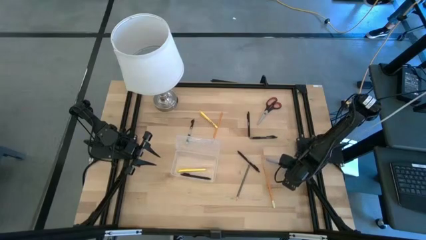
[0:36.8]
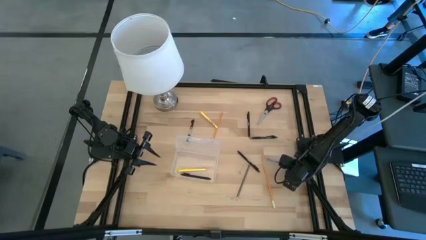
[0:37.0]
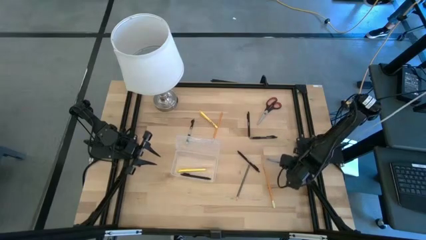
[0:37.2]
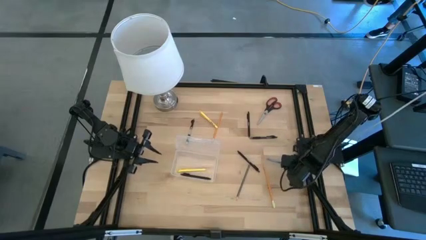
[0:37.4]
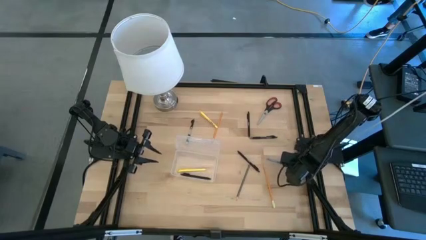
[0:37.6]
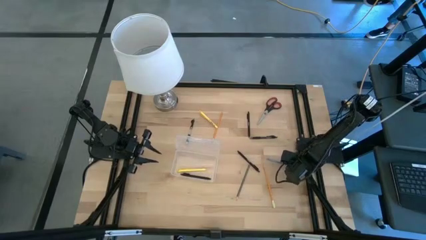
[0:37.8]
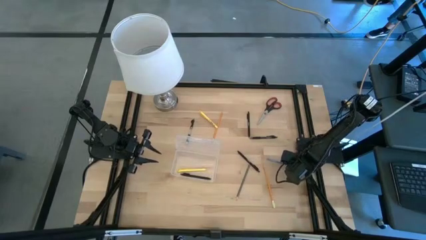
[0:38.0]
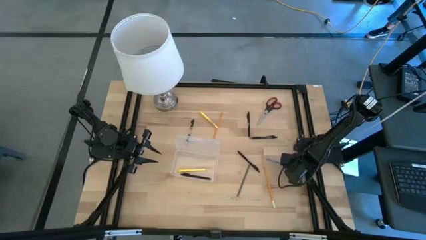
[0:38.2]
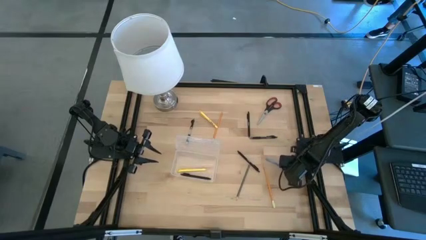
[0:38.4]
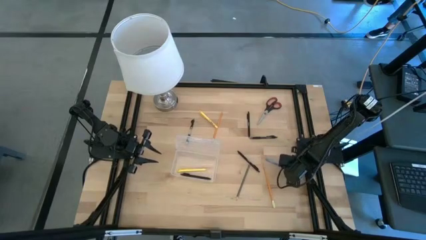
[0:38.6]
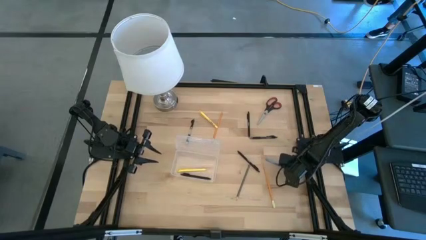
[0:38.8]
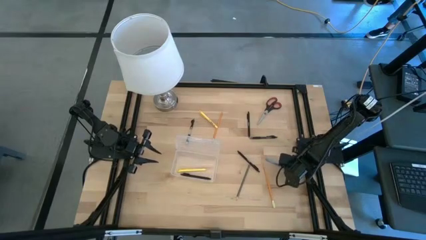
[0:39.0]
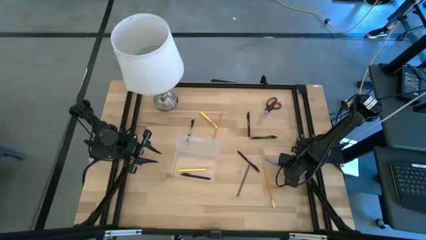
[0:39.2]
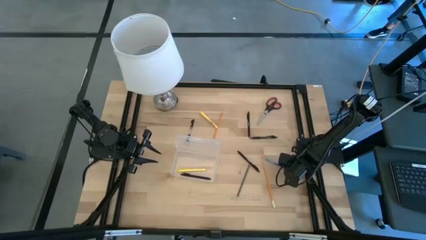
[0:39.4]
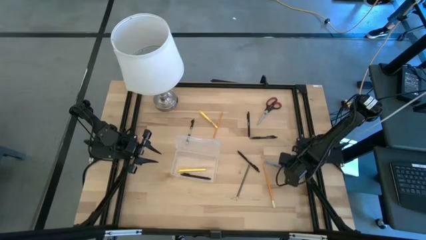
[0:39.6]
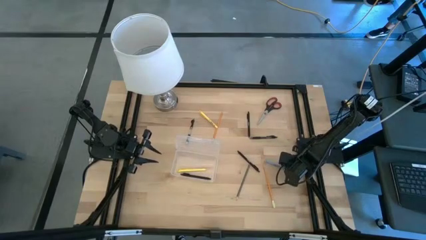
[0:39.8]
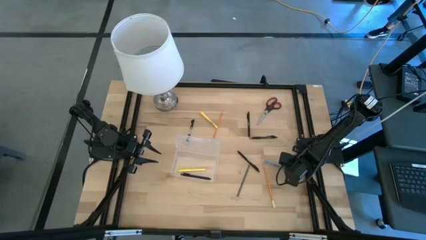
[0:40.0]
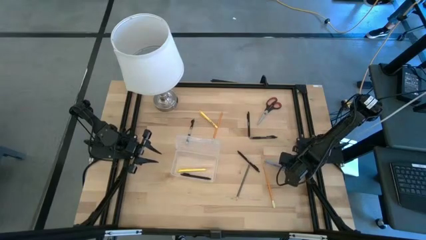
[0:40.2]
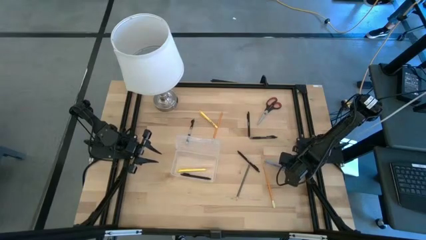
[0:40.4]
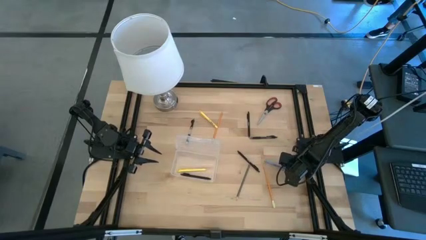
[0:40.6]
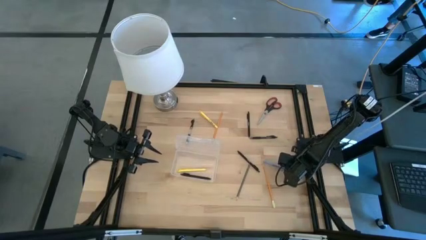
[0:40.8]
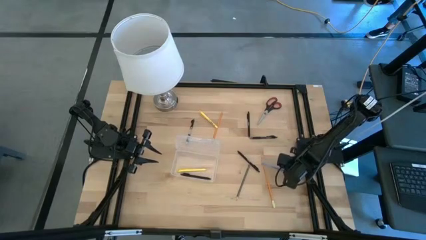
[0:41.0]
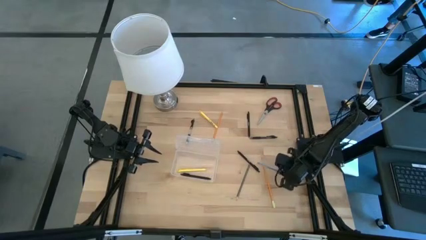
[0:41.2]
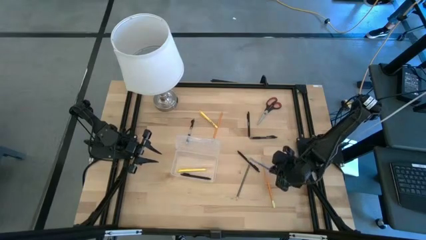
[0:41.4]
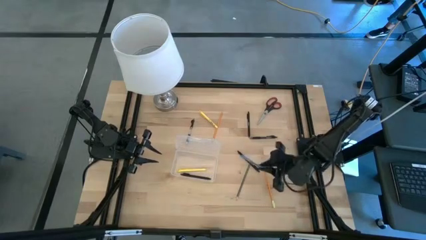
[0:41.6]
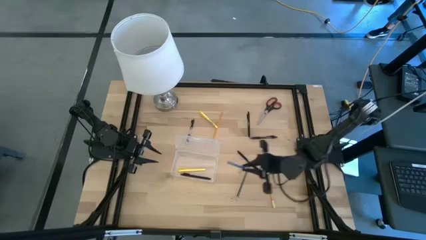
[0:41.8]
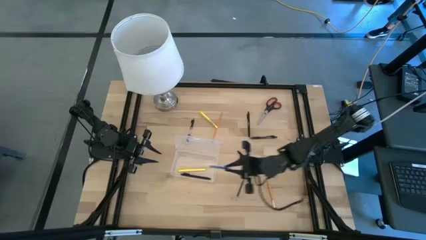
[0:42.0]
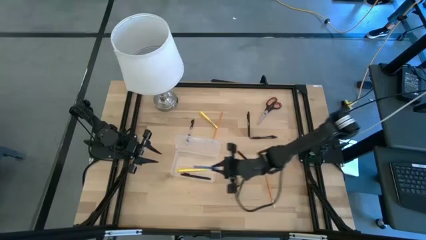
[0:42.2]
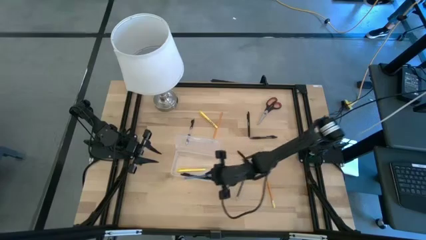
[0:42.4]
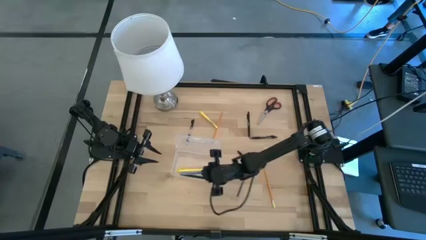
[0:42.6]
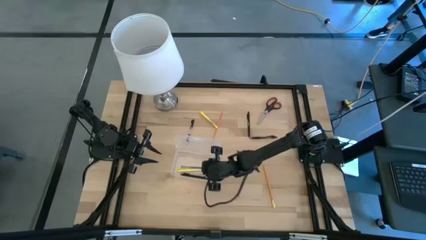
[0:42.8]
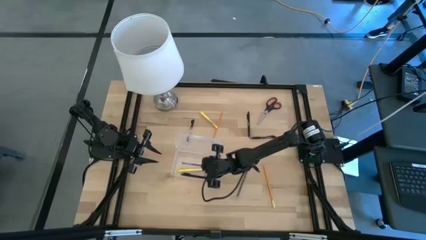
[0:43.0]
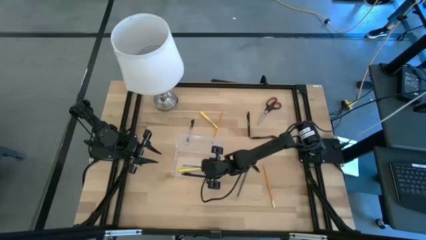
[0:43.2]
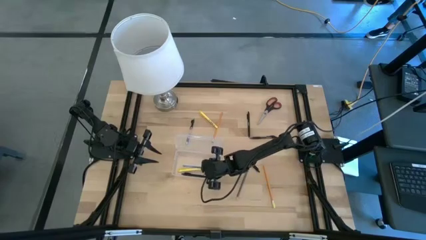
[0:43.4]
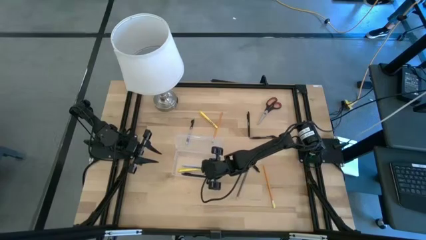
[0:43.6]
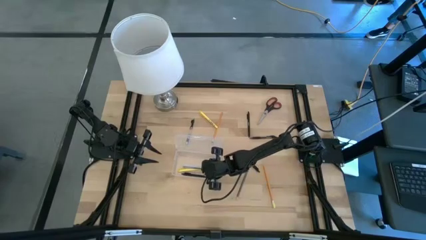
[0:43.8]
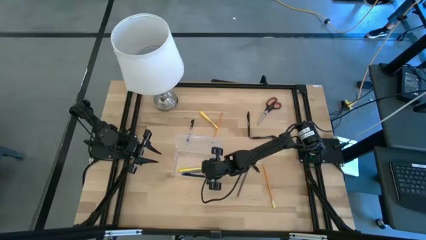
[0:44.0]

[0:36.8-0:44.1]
Task: Pick & place school supplies into a supply box
Put the blue pen into the transparent supply box

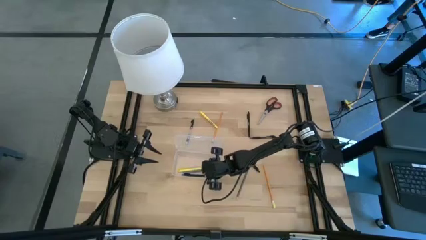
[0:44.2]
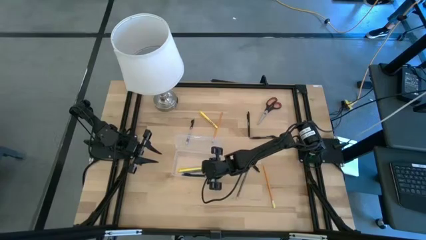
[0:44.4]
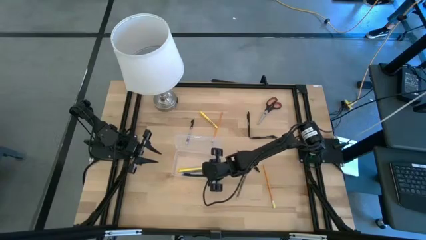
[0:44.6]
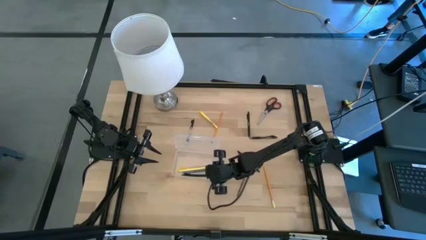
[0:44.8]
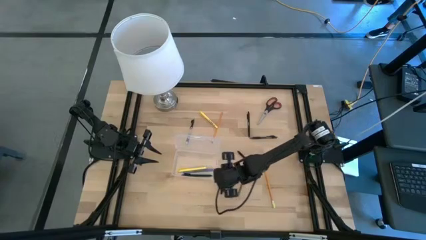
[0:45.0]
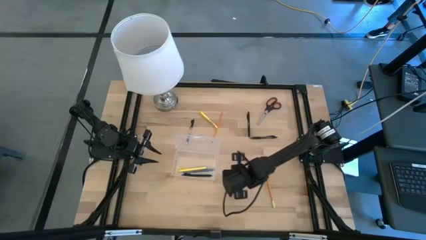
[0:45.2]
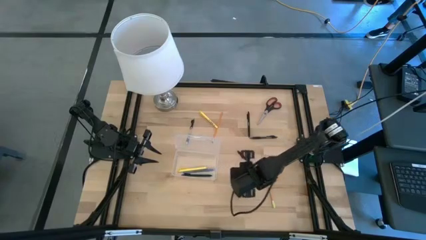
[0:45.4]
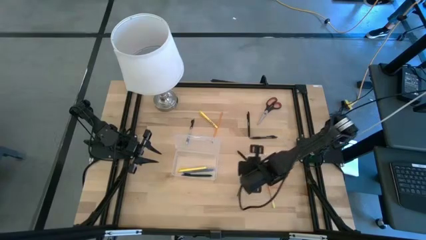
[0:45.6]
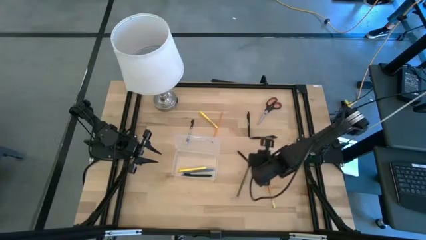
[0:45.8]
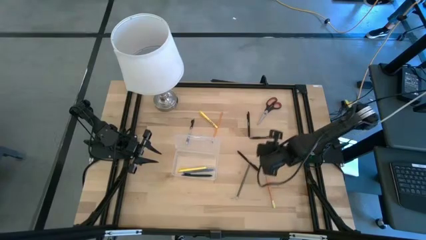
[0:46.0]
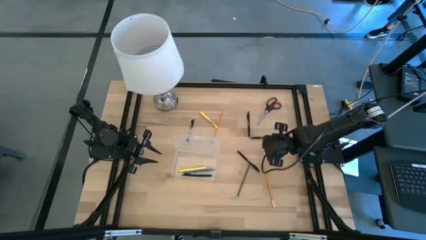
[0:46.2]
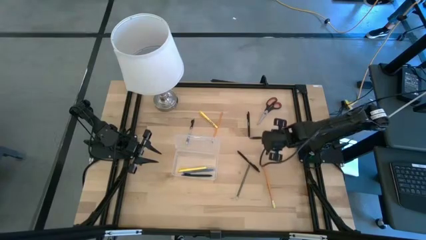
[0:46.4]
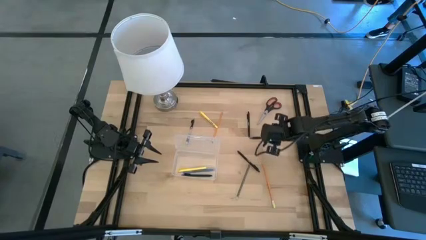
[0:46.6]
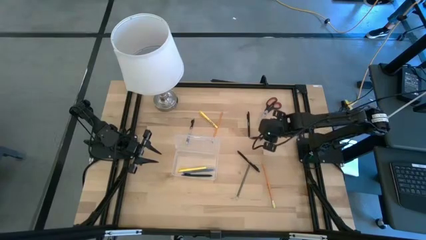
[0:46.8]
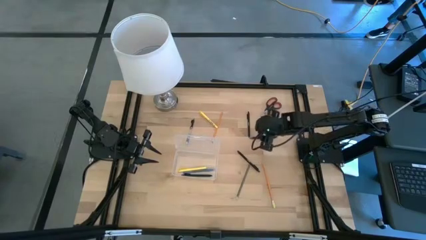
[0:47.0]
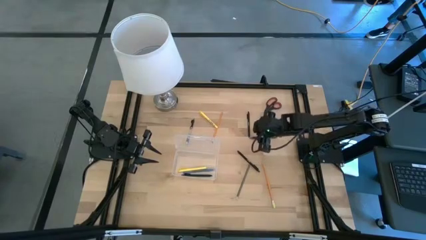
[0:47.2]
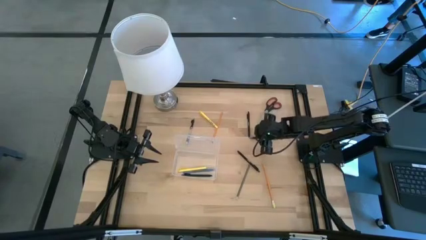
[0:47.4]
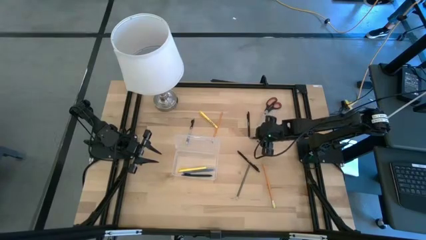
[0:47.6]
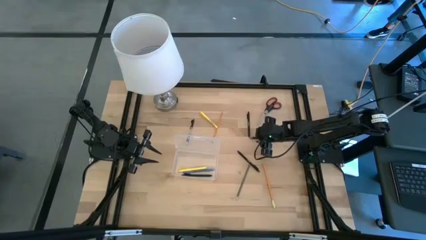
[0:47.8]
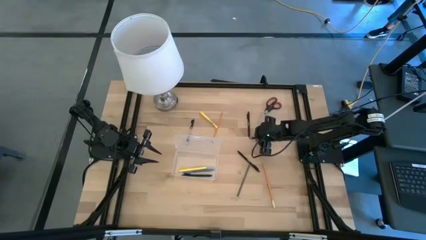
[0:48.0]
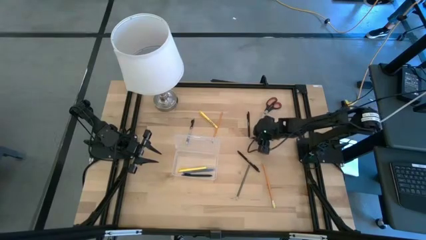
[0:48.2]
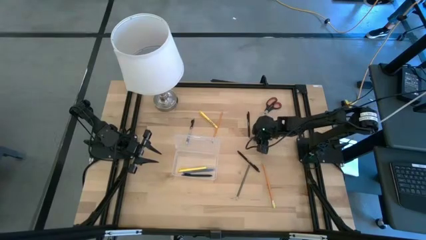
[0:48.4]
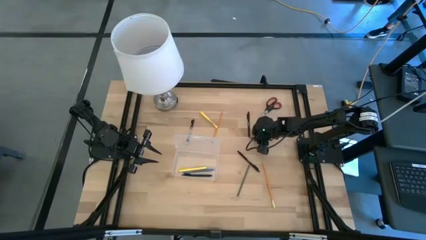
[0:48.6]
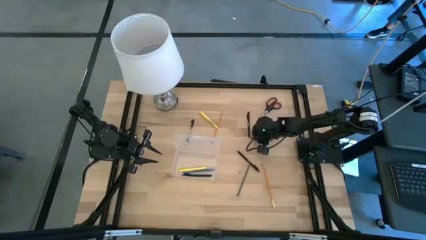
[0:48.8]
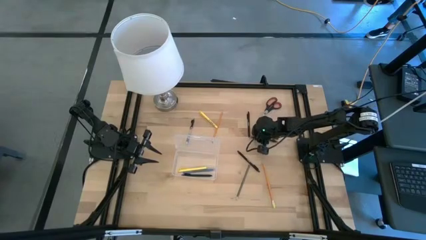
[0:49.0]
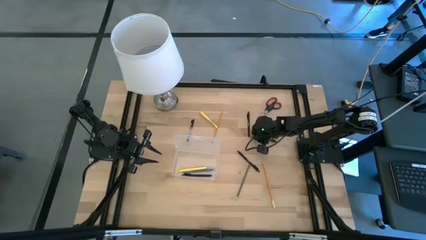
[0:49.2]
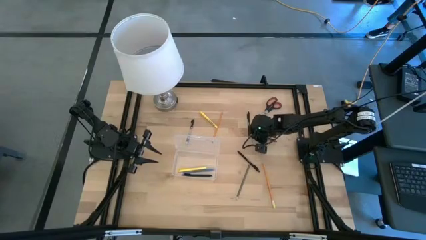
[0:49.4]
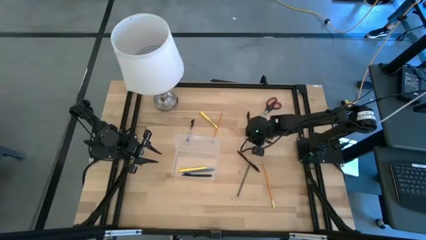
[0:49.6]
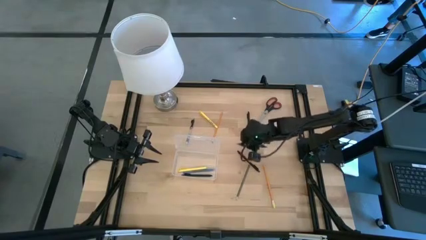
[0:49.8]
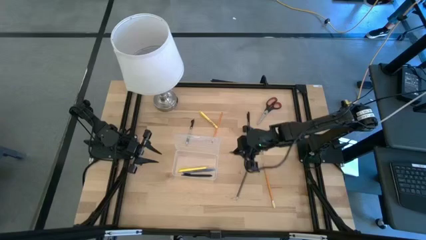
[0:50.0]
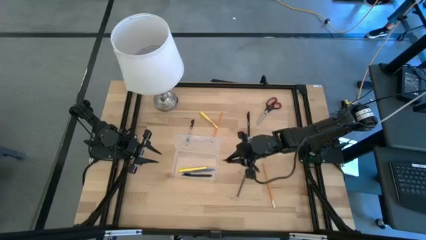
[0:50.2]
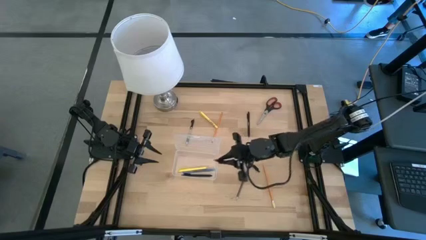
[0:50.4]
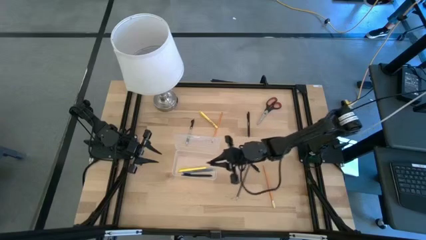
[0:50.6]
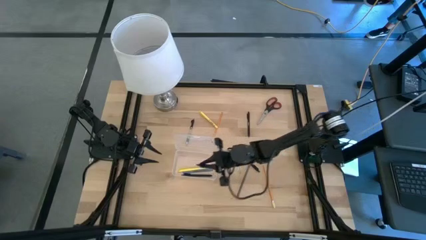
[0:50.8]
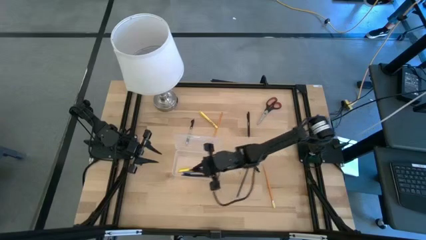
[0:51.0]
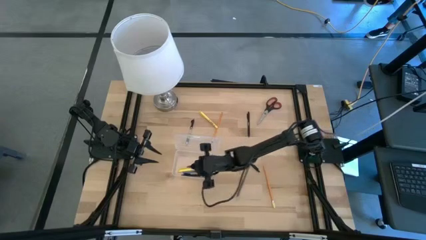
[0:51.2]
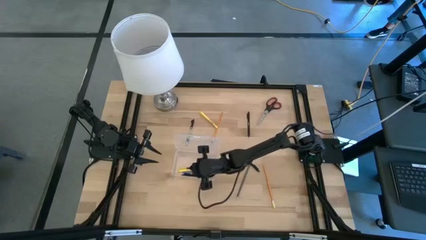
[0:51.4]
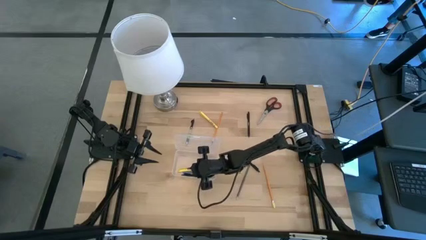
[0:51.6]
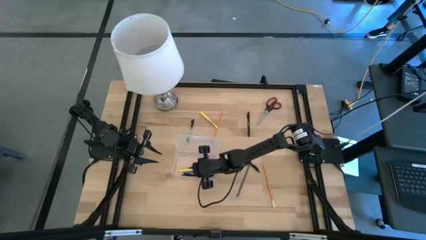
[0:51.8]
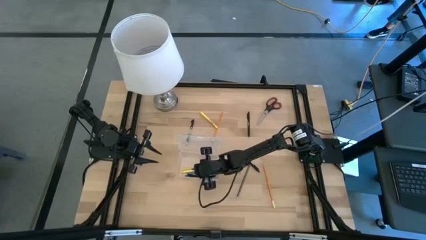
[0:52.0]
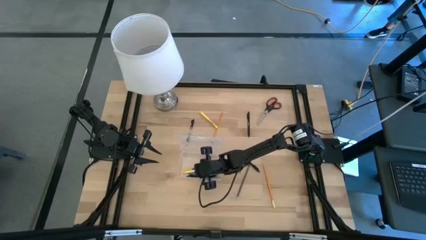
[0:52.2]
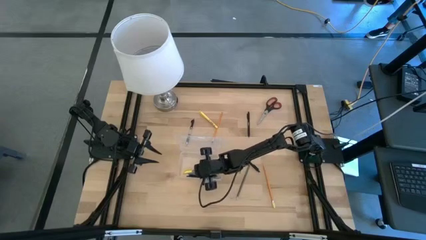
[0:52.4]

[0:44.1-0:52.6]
Put the right transparent pen into the transparent supply box

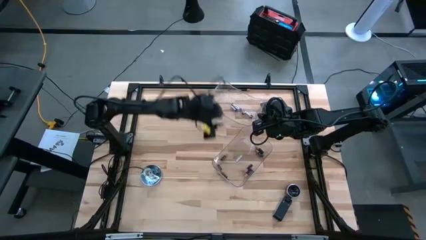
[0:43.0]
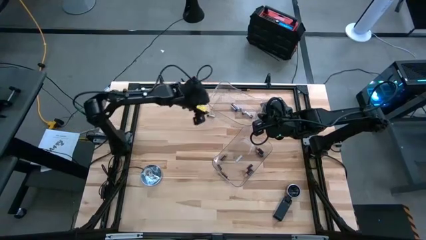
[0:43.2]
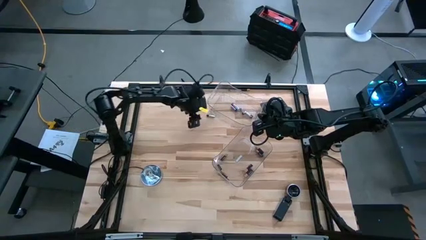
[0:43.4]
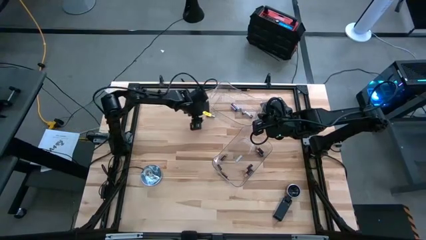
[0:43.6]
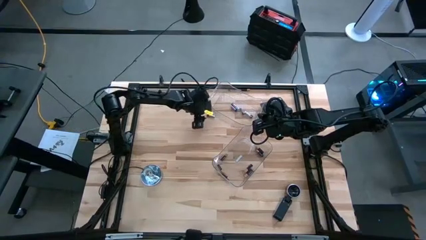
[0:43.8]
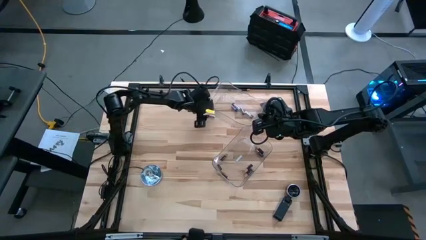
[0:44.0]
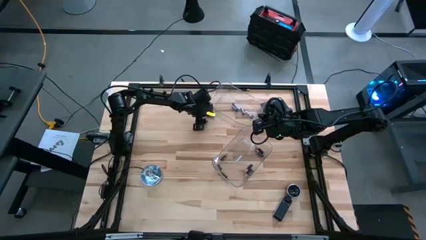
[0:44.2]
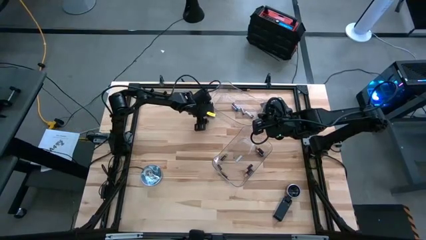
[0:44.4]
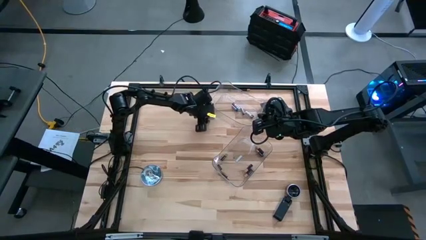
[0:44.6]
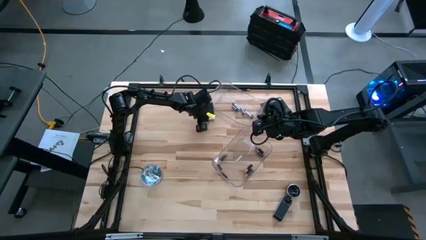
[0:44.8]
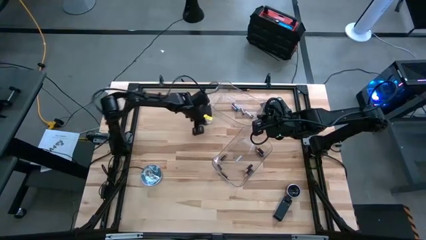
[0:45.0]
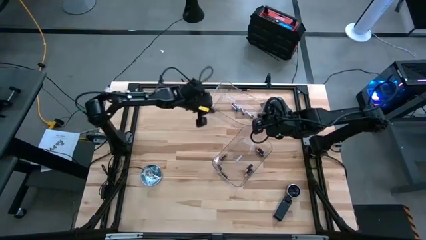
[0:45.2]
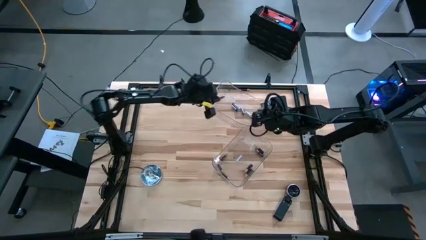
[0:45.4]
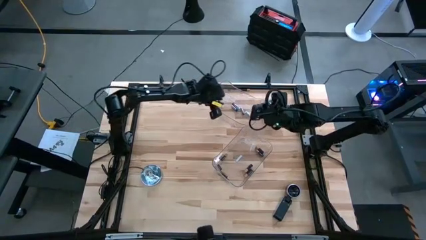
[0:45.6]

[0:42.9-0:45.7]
Task: Sort batteries
Put the silver battery into the top transparent bin
